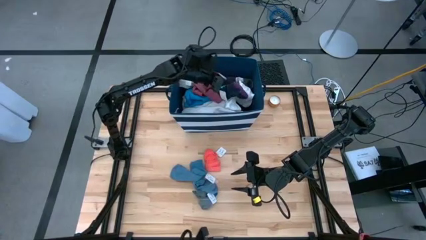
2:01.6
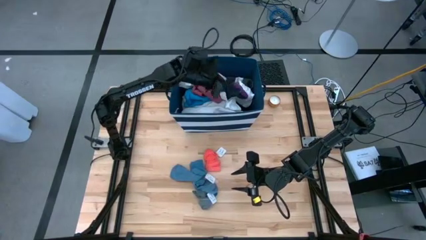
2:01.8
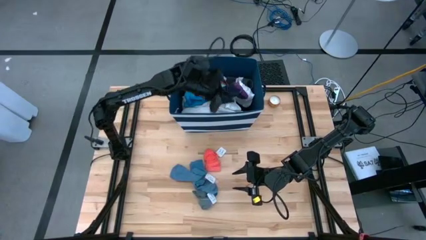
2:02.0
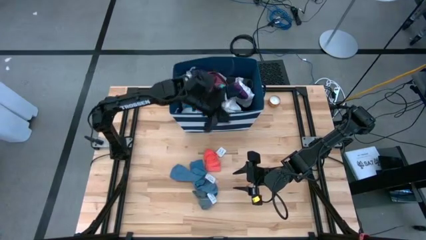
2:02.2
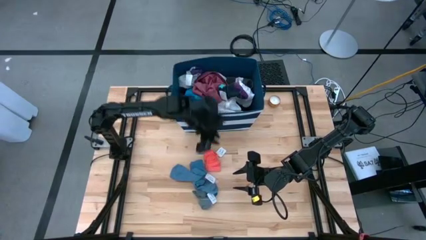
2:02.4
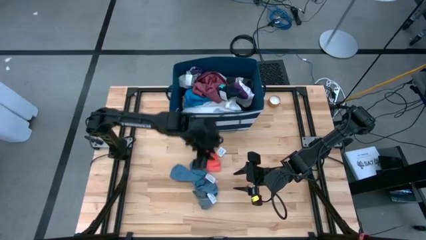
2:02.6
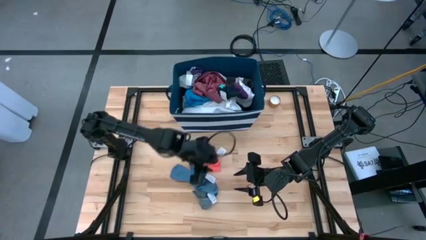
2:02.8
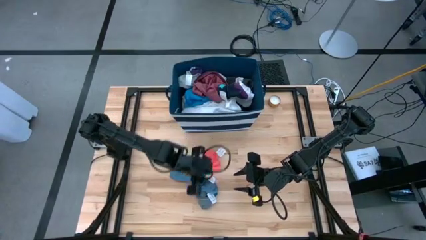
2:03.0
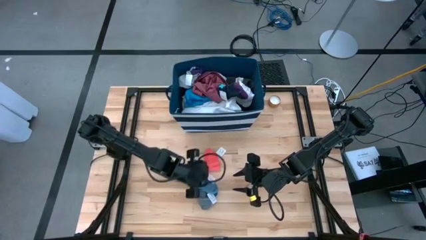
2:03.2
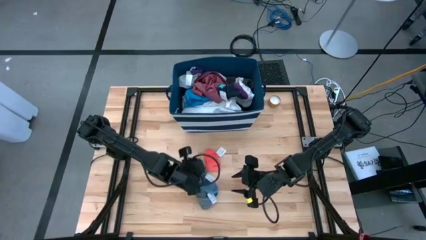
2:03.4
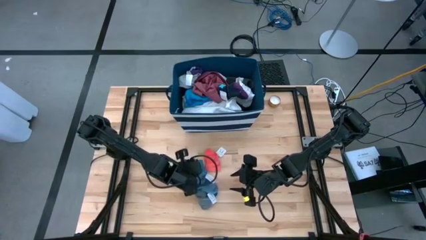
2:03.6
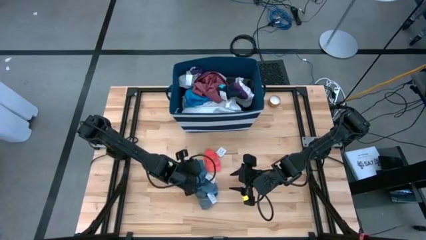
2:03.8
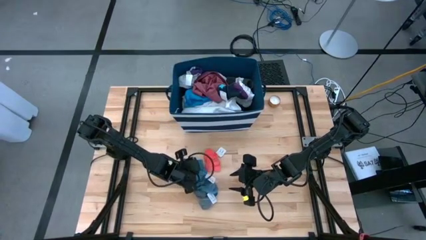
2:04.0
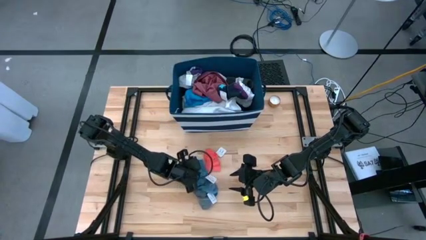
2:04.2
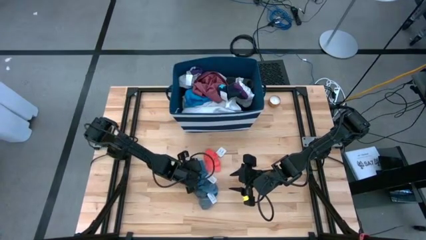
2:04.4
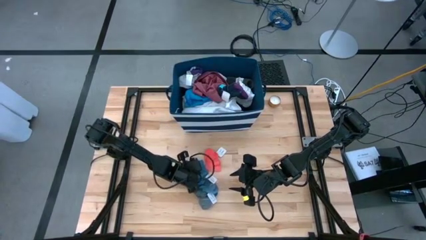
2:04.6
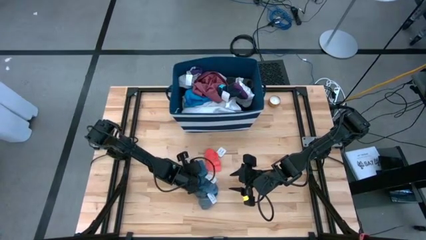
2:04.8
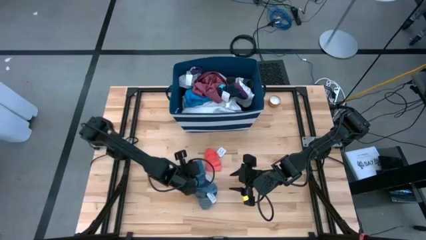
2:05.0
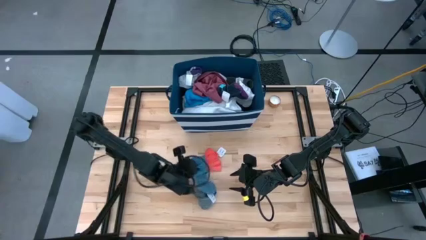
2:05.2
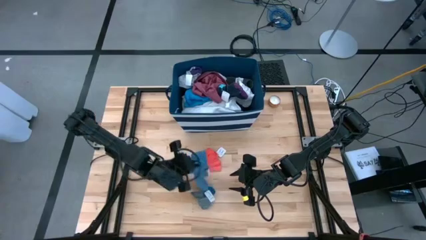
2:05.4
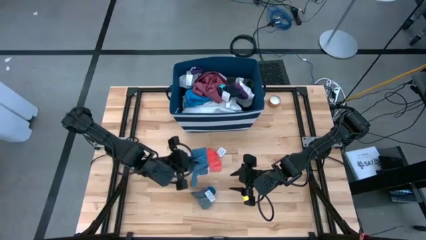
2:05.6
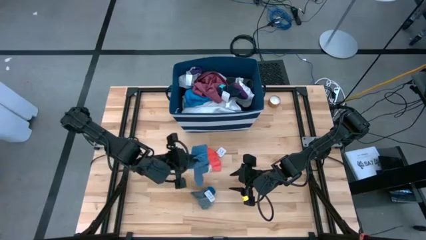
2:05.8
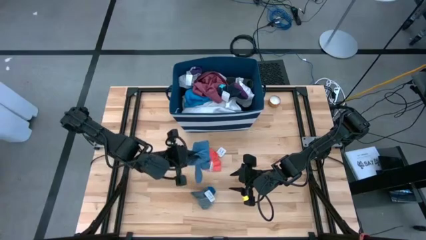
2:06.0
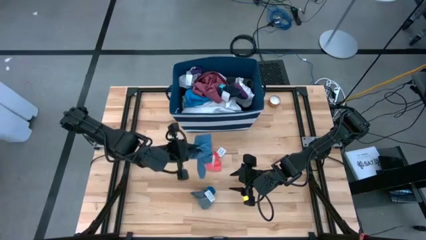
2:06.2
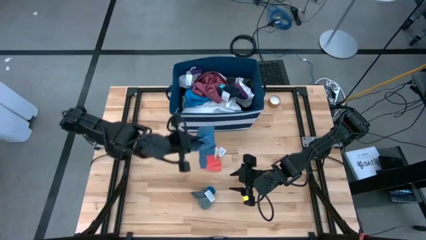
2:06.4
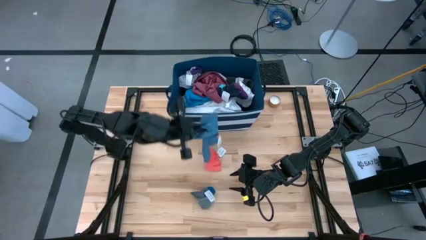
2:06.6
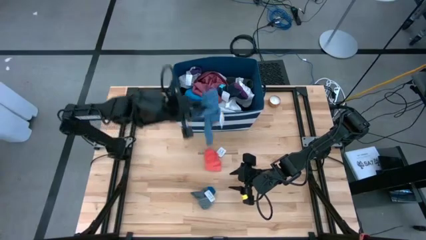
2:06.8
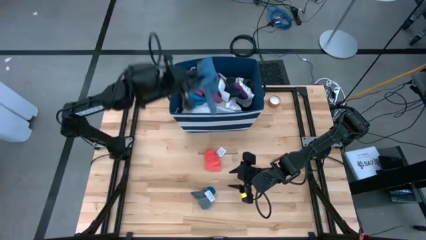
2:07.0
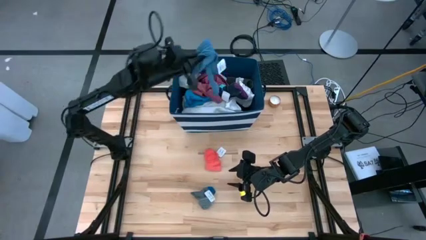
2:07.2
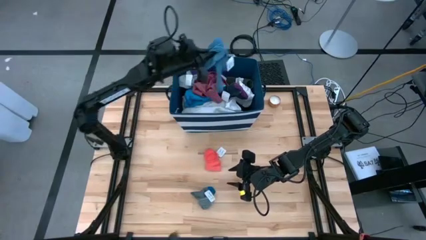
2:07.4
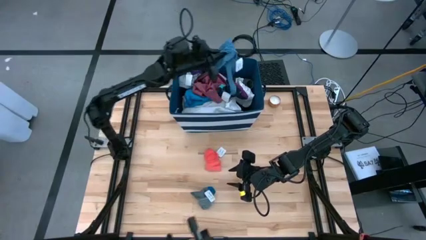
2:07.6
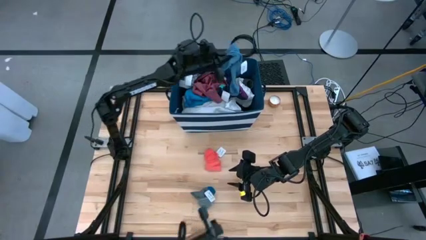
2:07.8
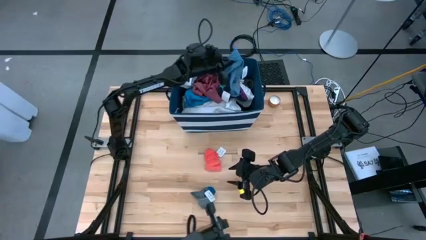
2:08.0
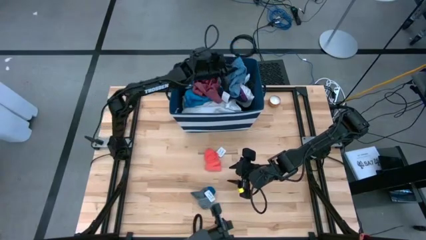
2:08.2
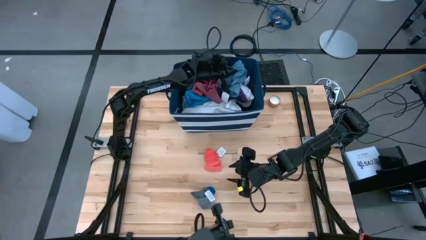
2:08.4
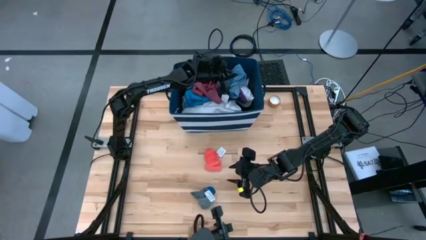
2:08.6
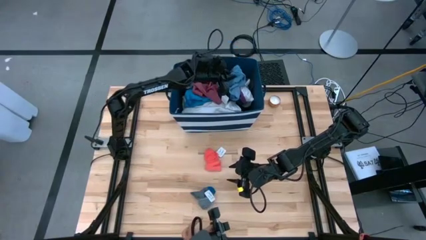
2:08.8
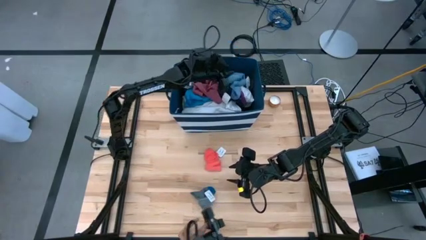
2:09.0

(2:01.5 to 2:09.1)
Task: Sort clothes
Put the blue pair of socks into the blue laundry organizer

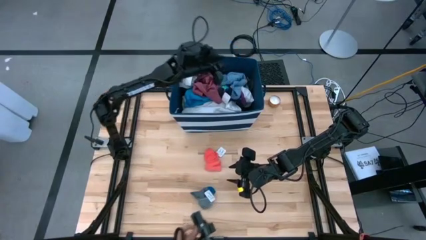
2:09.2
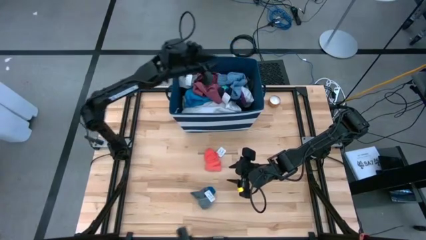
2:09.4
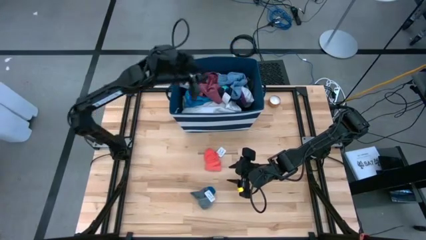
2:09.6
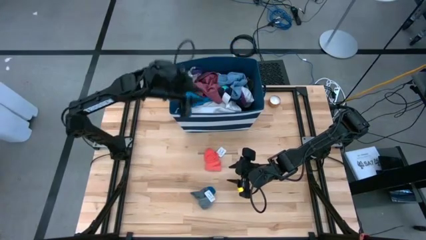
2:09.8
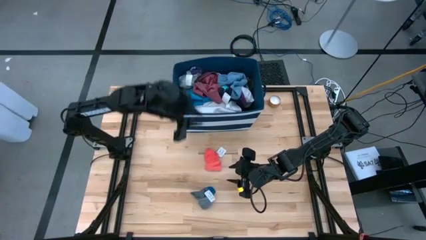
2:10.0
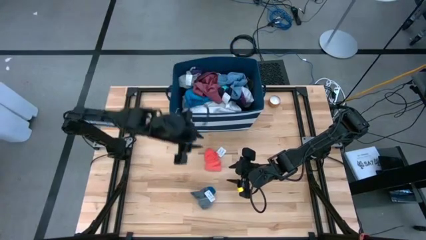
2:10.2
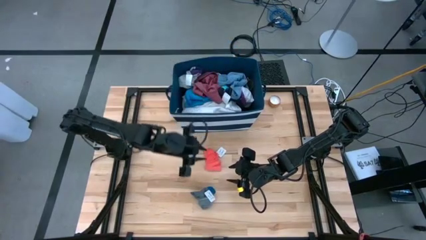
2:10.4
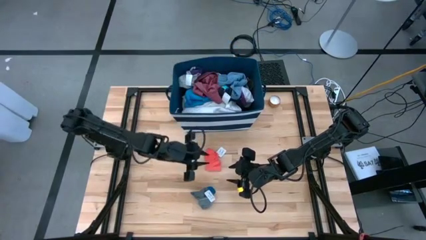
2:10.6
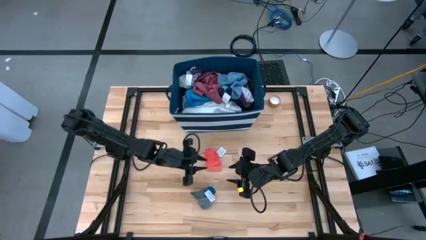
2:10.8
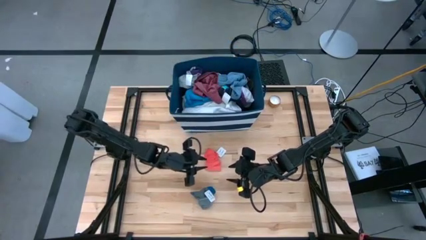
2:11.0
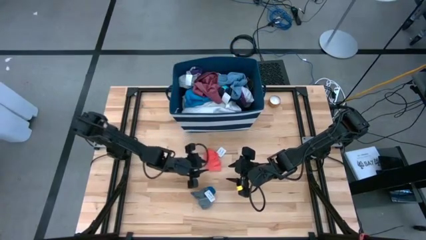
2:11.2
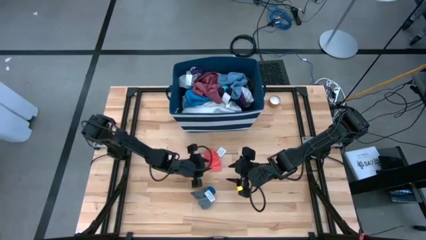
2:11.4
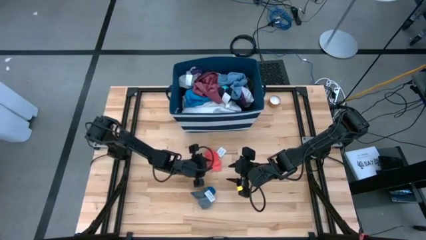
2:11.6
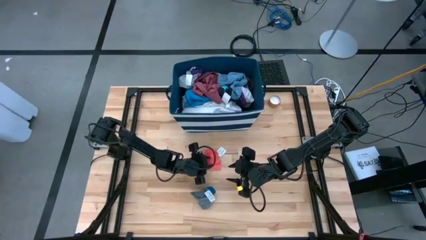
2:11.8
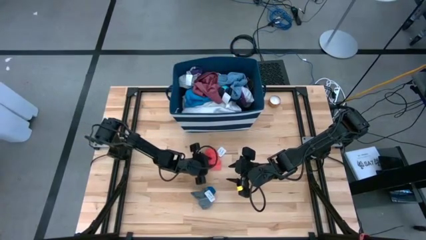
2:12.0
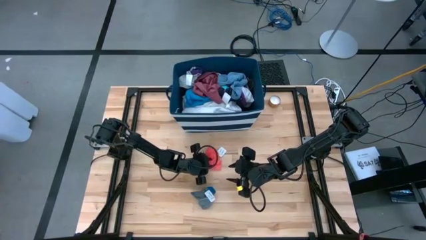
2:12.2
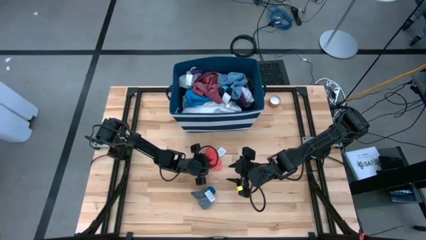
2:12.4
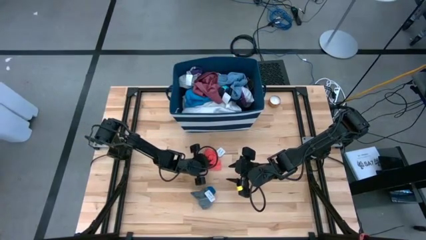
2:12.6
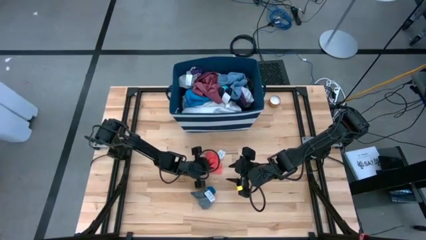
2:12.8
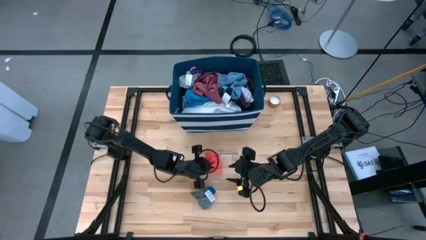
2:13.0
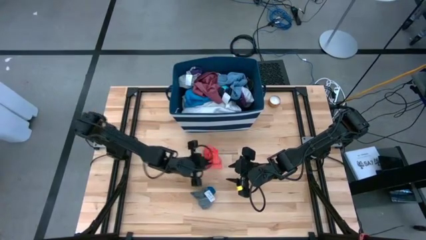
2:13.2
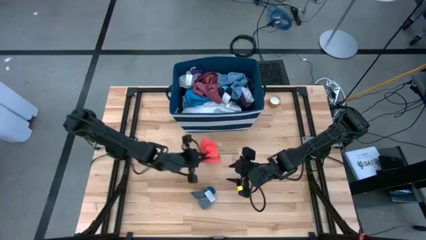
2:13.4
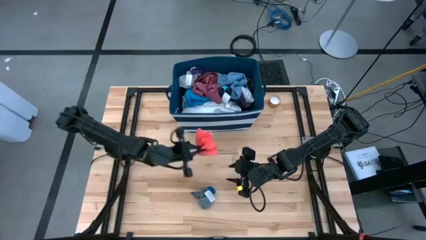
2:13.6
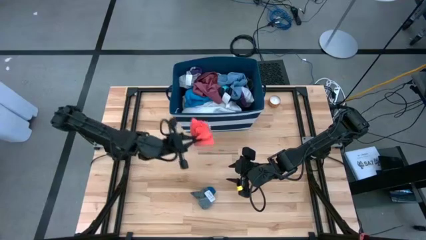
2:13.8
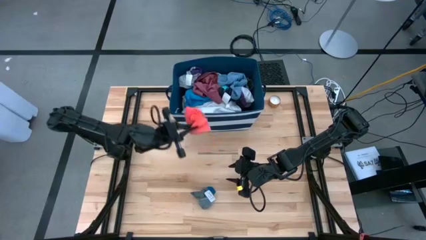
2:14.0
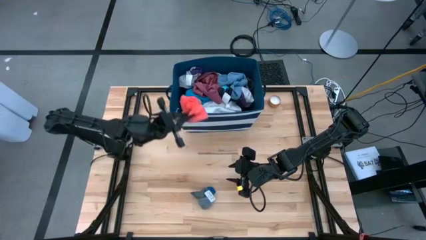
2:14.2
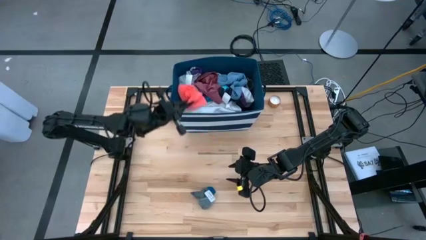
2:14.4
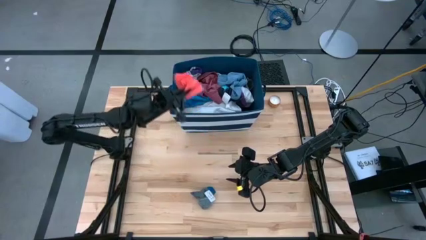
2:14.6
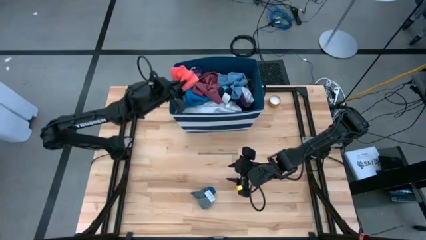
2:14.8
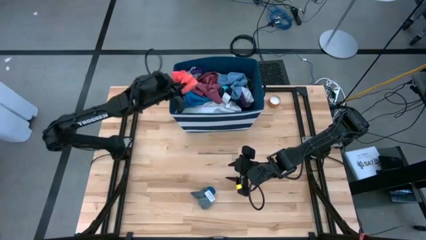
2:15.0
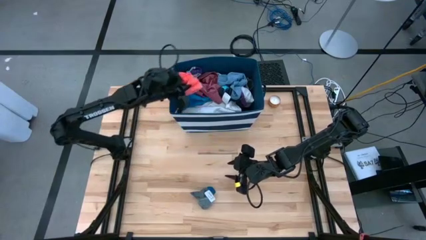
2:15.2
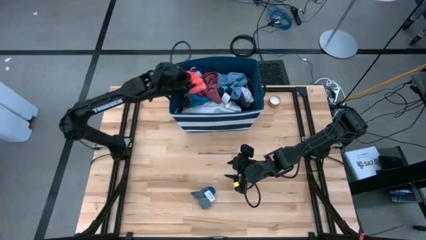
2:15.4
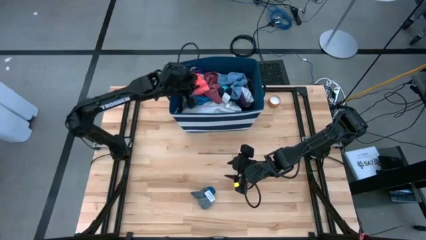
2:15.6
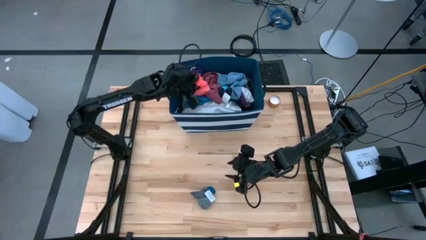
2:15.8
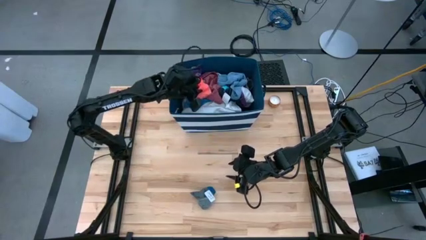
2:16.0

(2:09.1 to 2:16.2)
Put the orange pair of socks into the blue laundry organizer

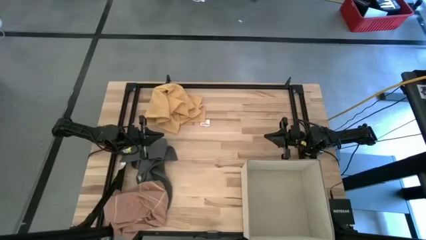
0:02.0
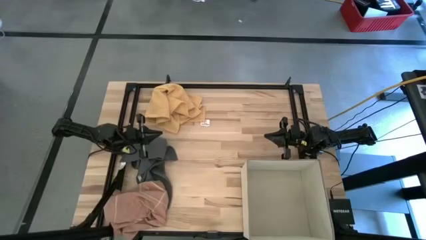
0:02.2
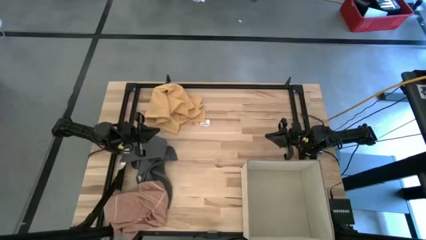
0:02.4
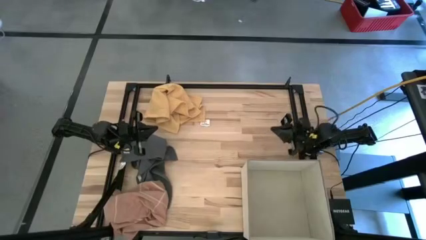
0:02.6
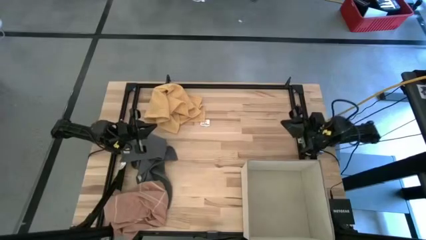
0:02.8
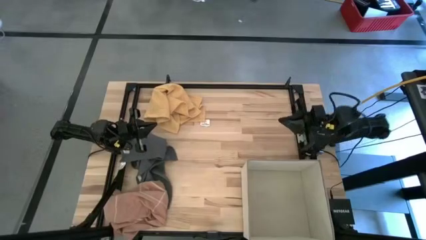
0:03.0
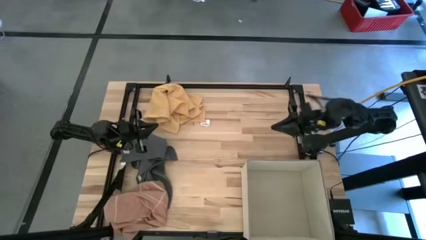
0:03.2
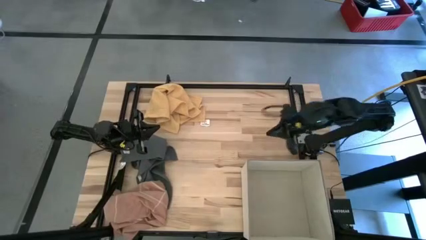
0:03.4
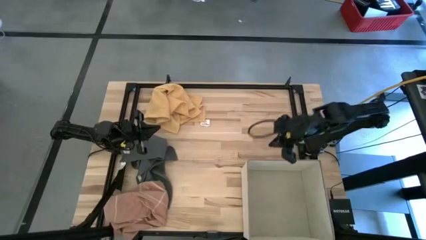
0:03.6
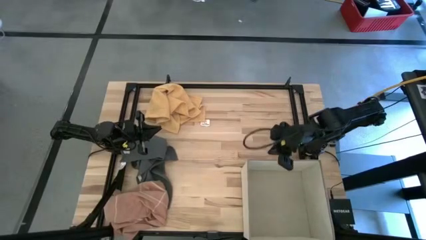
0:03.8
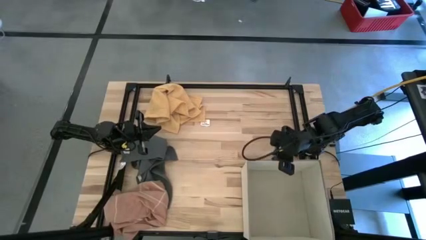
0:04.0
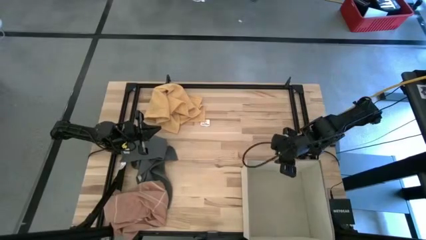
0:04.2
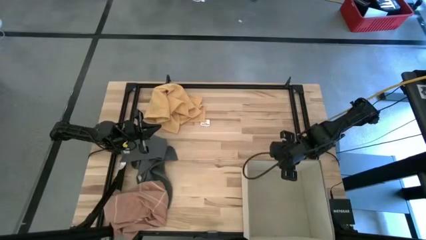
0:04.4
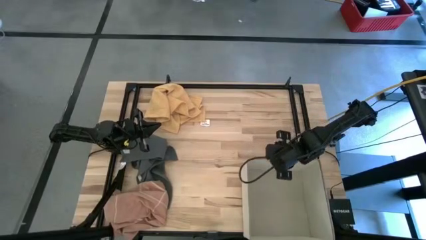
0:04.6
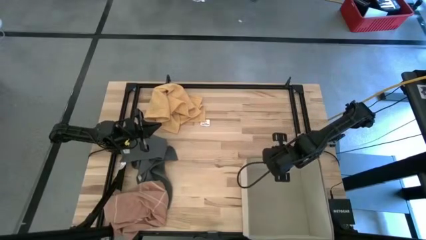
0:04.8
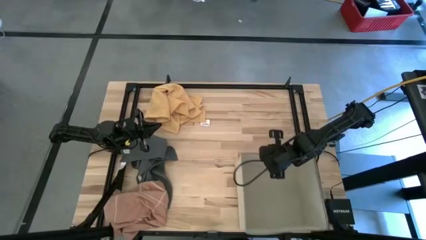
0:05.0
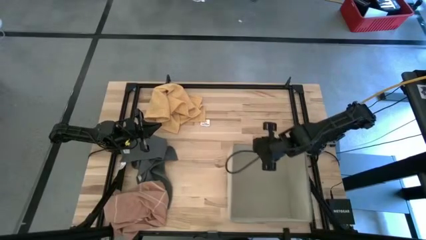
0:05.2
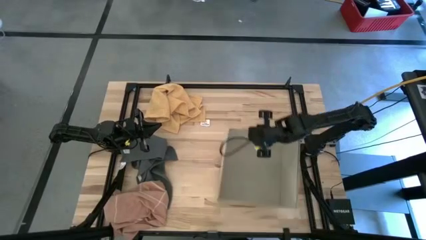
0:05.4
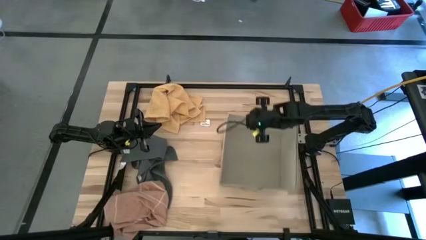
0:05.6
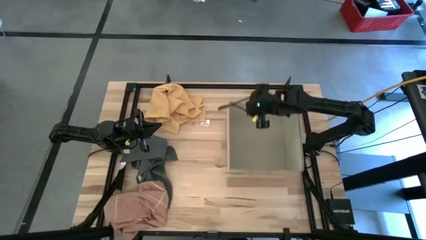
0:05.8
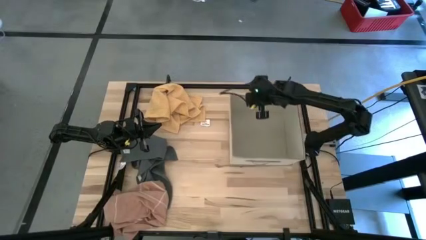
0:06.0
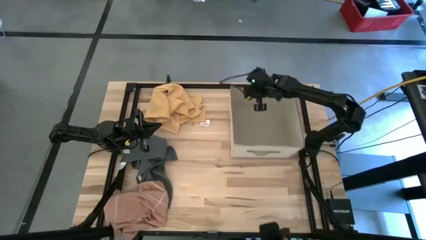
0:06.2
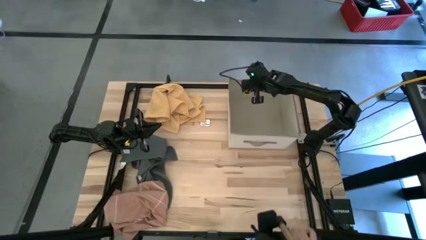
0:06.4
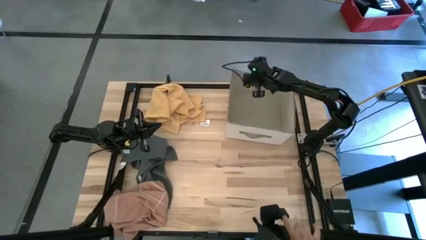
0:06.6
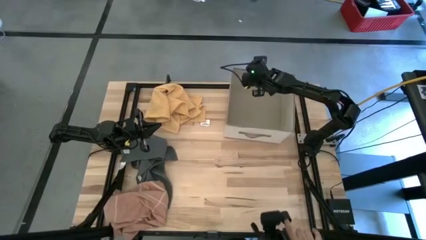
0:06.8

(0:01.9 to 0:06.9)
Task: Fold towel
Move the laundry organizer to the top right
